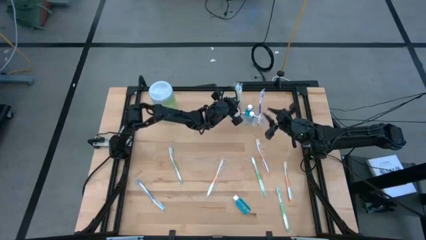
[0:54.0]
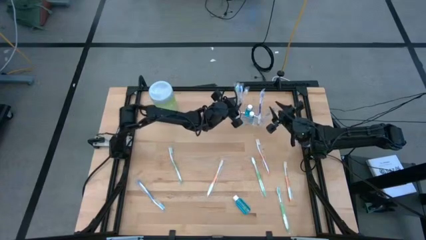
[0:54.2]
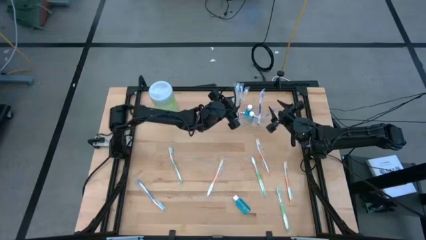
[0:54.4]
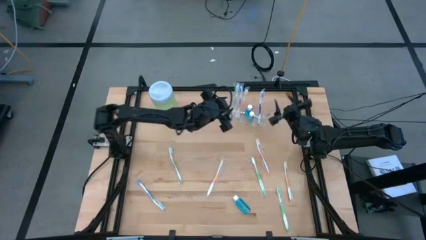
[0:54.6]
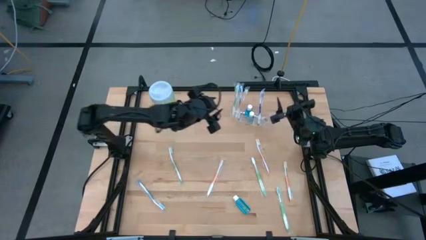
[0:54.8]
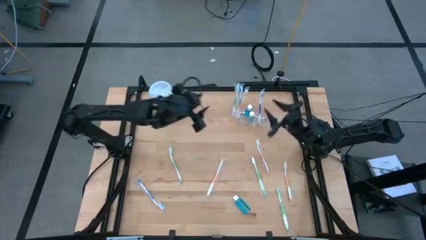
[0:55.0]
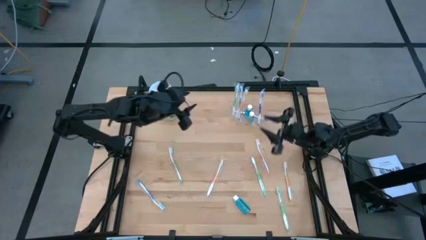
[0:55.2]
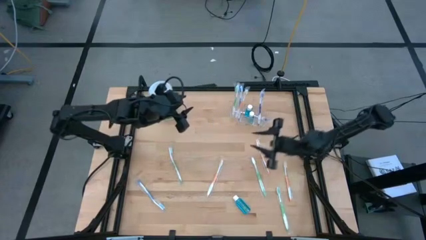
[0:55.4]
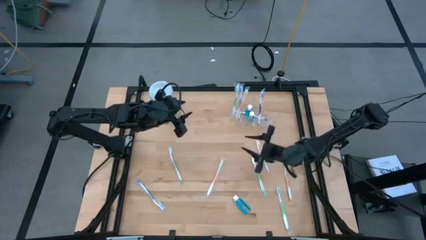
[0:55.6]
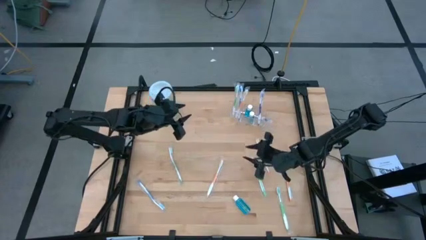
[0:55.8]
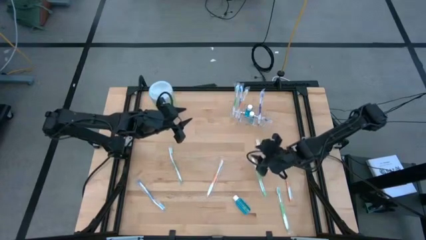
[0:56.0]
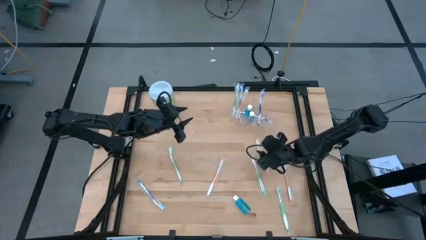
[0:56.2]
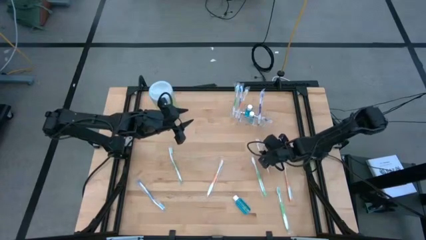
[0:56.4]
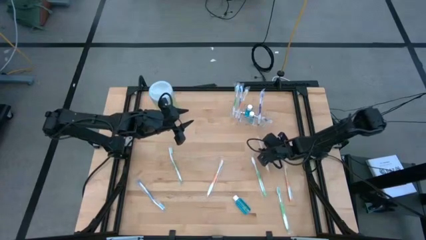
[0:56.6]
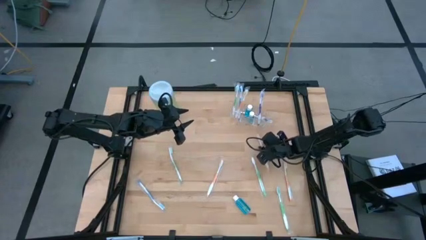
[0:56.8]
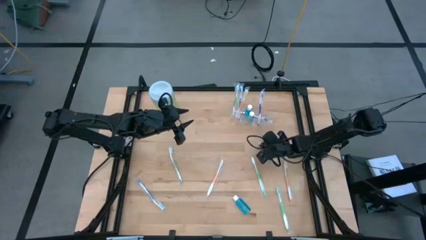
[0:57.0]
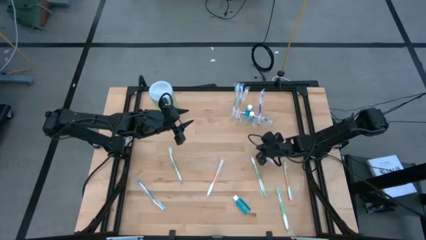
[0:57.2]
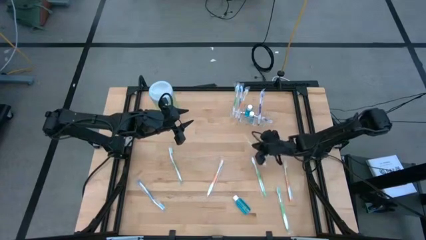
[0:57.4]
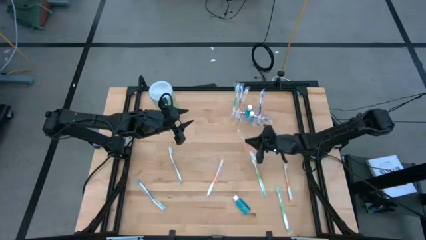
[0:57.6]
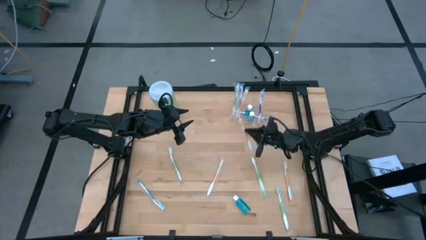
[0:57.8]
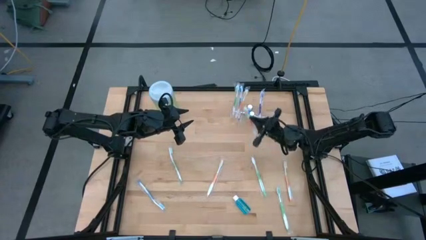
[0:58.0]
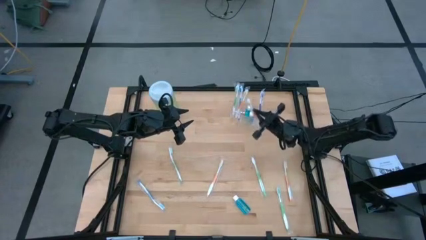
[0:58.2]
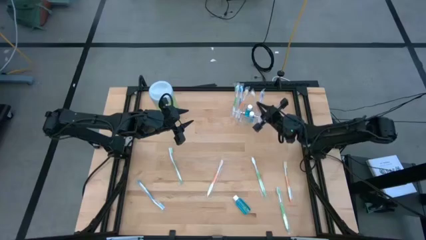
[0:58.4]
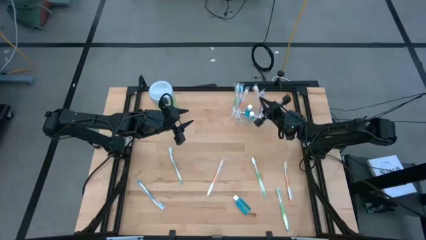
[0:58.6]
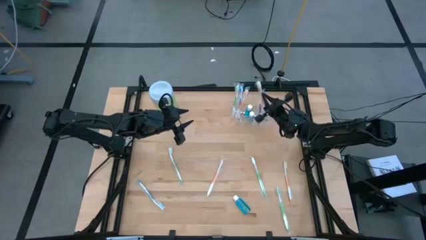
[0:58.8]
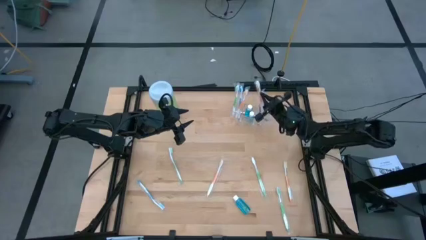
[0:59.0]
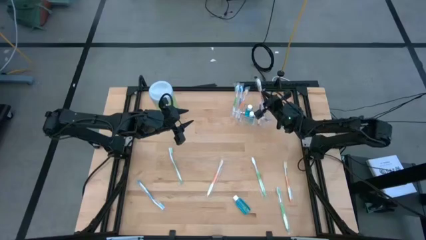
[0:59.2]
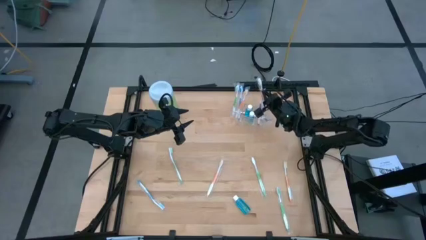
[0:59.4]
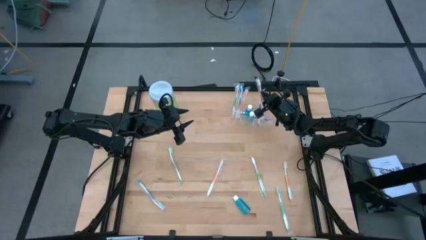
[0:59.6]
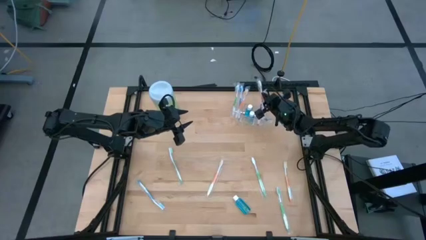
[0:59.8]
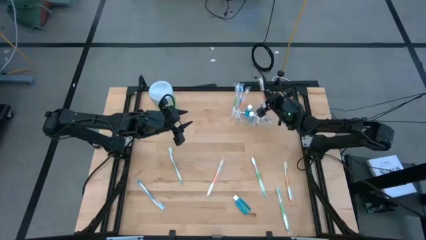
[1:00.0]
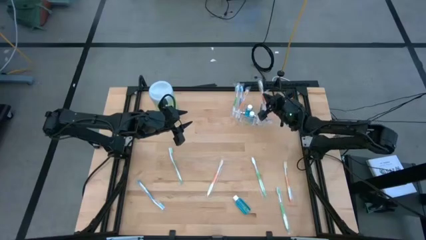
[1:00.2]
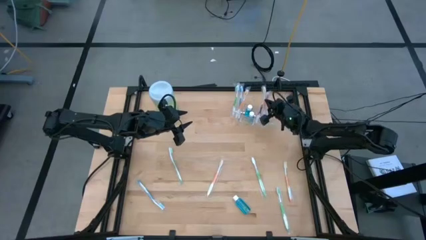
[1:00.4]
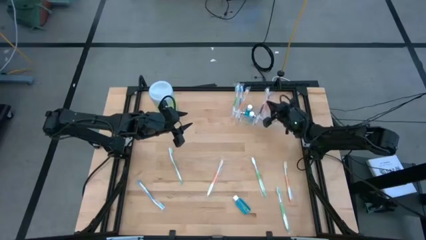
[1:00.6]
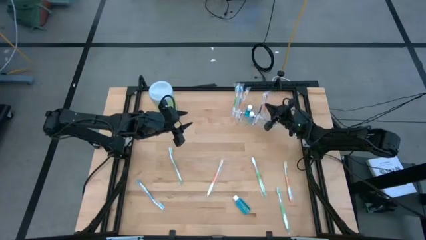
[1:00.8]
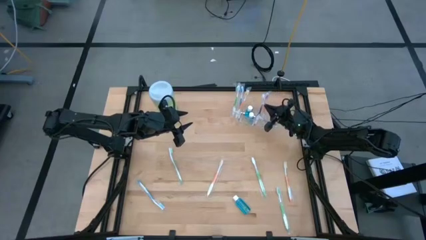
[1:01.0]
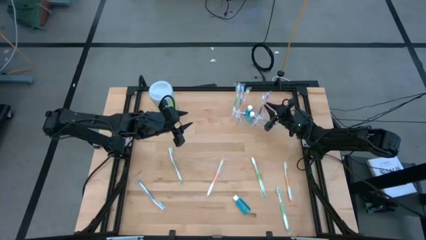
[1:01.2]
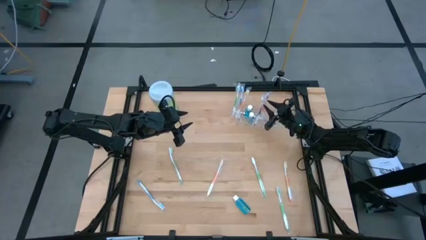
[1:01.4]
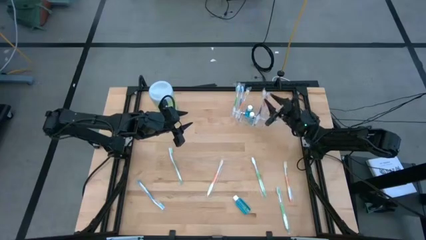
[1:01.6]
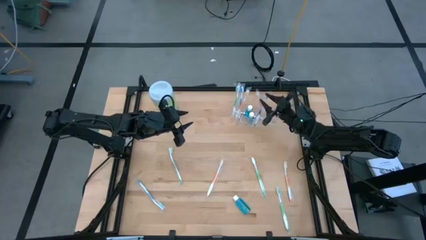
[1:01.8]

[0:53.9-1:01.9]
Task: Pick & Place toothbrushing station
Put the orange toothbrush into the transparent organizer

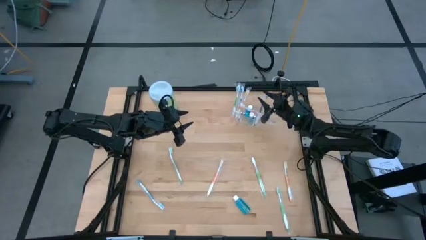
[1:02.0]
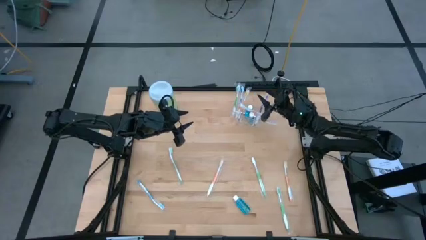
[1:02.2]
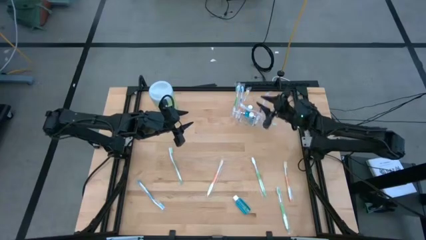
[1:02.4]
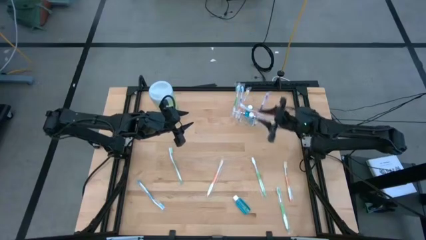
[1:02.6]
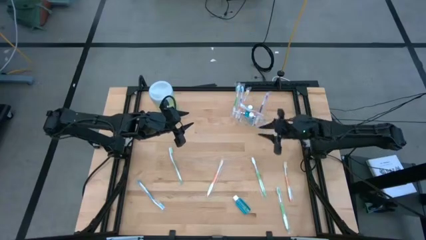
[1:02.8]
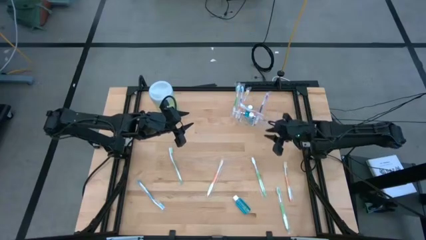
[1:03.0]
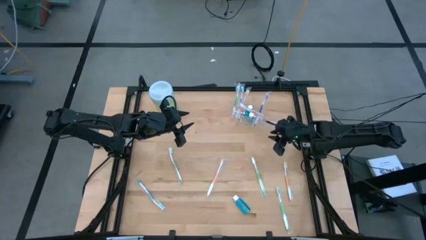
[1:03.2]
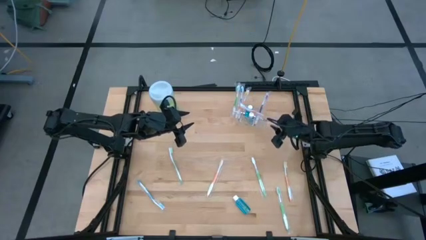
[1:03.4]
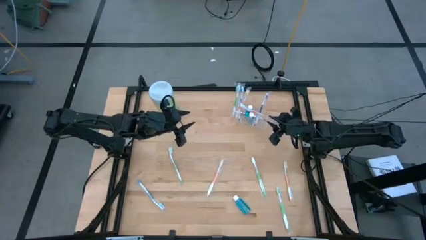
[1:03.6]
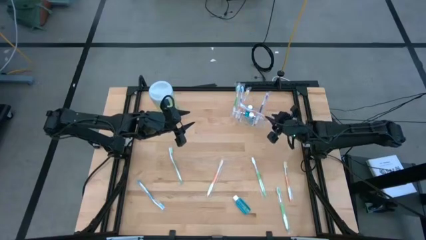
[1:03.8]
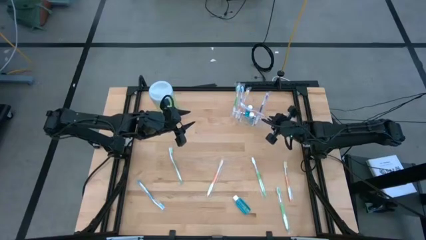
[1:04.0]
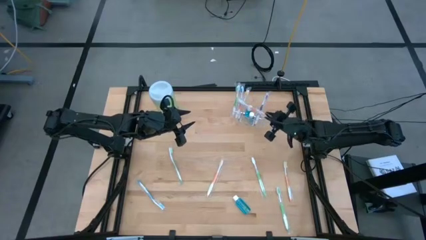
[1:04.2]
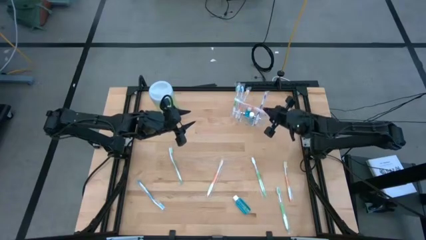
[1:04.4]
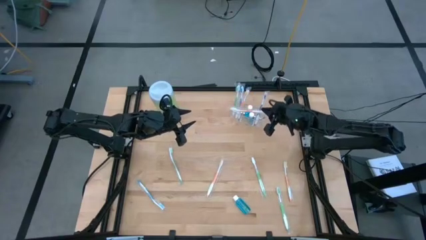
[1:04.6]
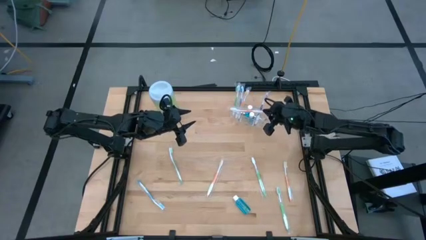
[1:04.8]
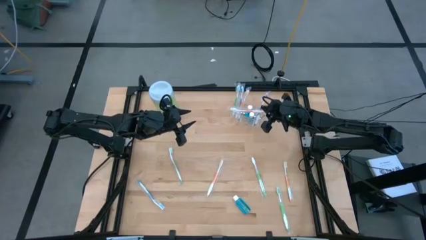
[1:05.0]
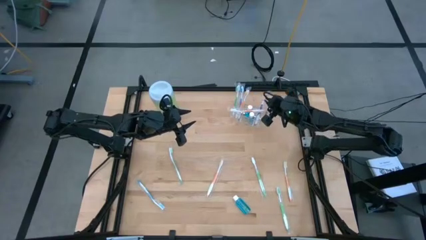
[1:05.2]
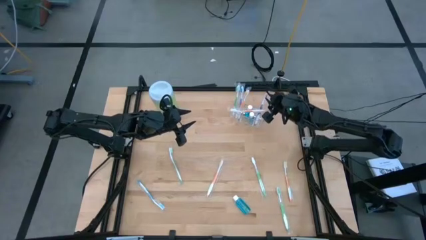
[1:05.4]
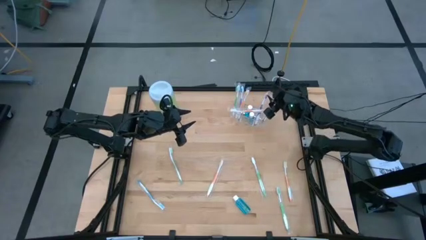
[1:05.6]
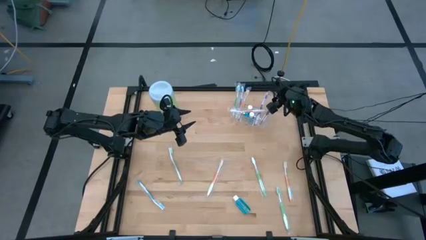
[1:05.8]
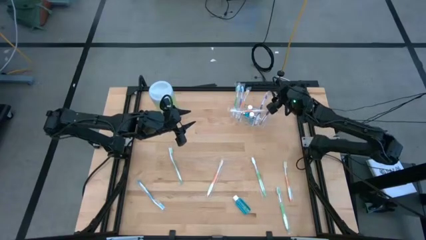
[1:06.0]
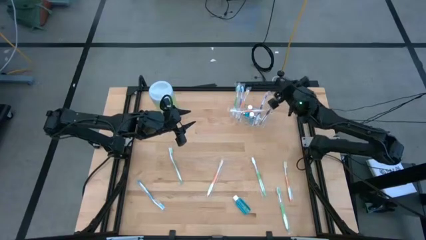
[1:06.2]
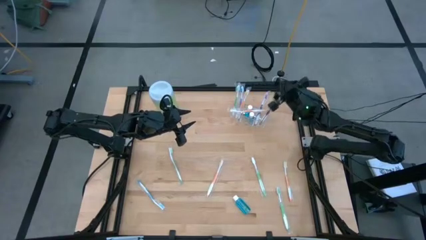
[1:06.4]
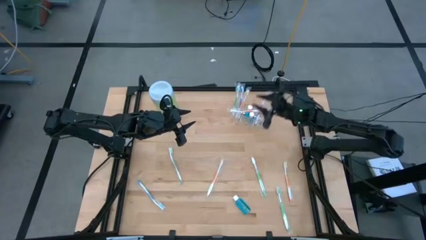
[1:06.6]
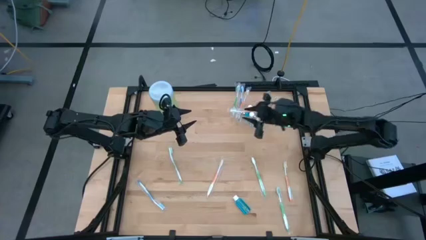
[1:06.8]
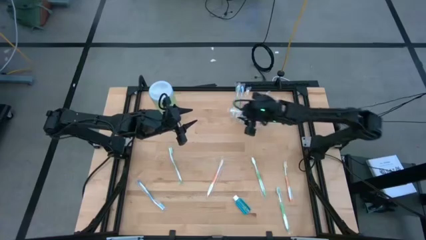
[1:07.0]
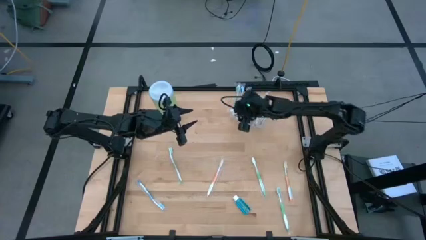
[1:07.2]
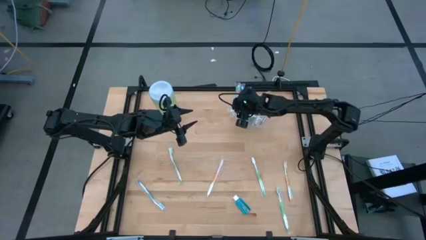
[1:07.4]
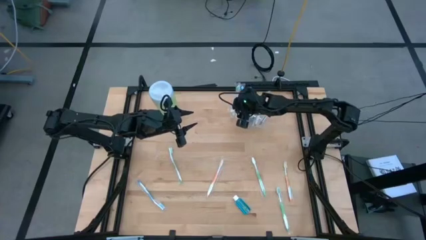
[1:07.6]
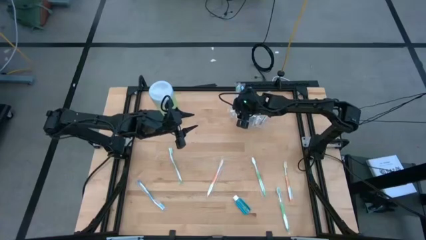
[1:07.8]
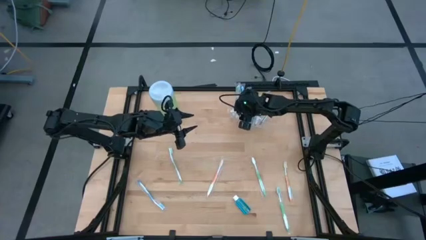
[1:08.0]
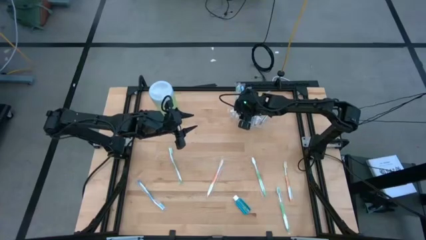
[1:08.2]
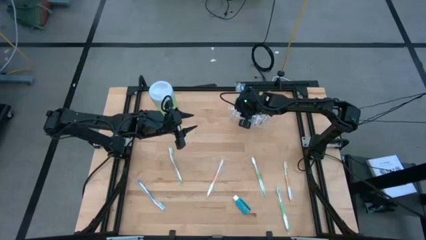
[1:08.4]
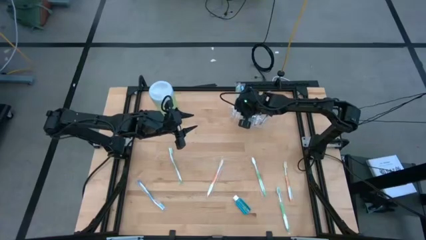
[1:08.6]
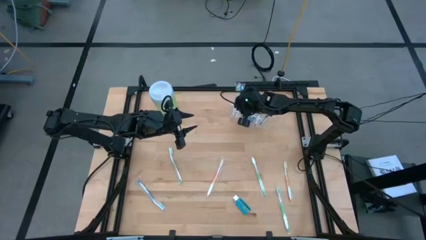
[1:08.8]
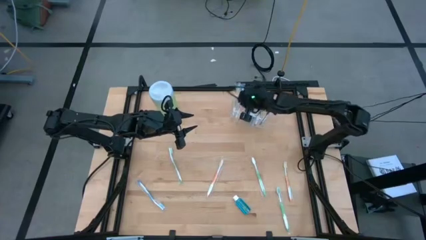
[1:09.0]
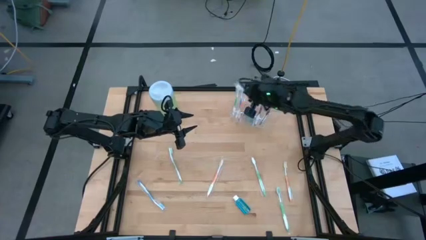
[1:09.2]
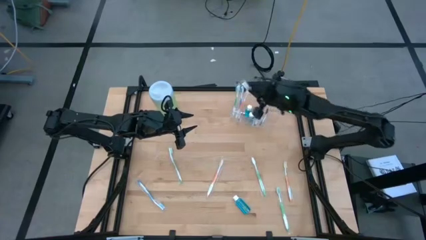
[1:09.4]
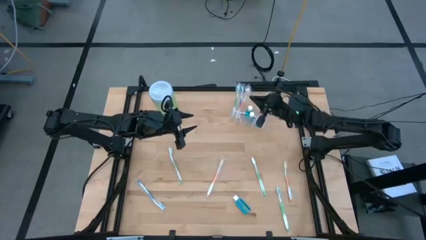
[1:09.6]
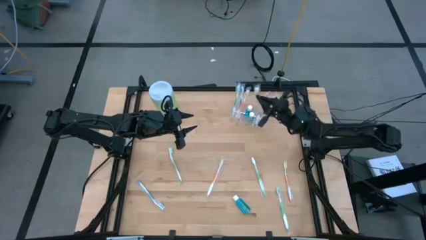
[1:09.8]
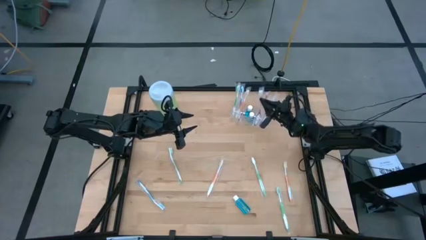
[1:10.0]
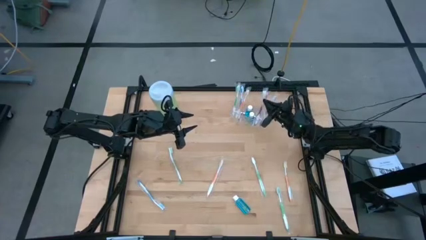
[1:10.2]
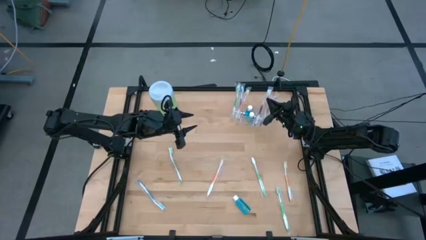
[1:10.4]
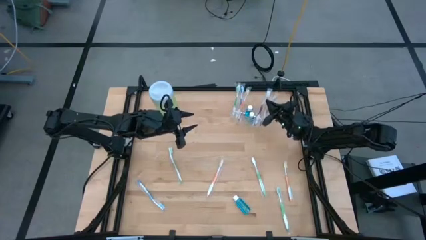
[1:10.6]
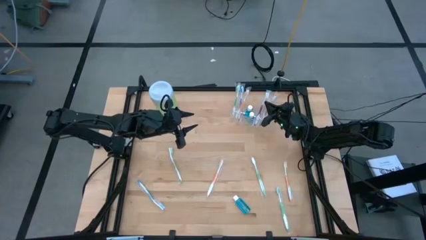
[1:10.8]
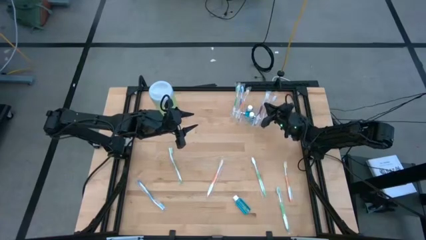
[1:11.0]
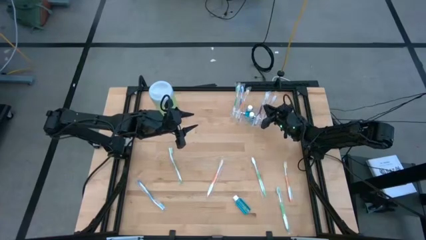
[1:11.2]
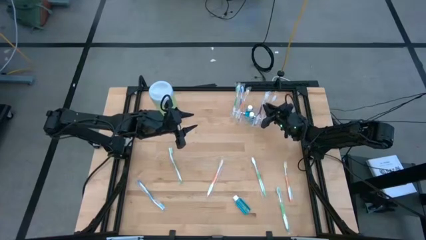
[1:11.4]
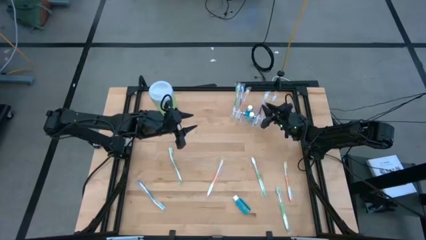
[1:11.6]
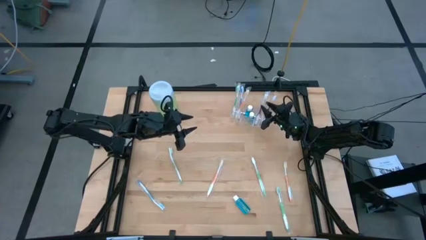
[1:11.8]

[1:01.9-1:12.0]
Put the orange toothbrush into the transparent organizer
